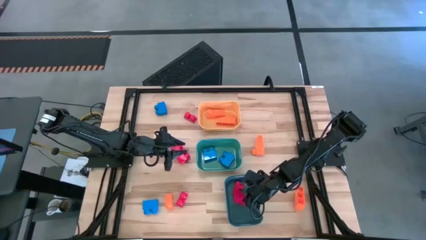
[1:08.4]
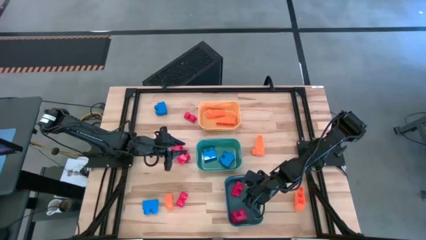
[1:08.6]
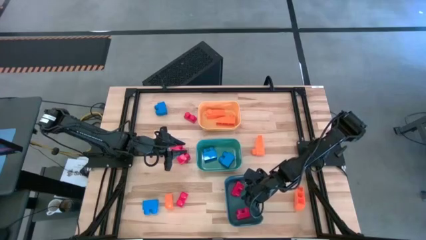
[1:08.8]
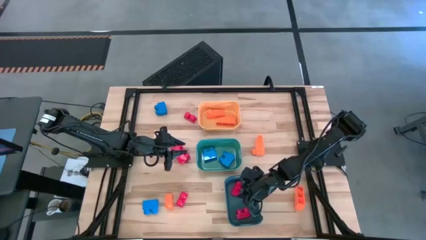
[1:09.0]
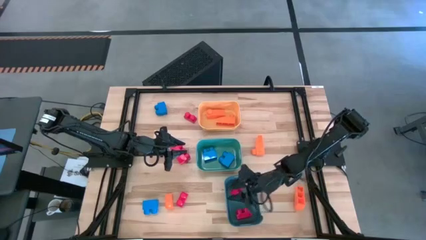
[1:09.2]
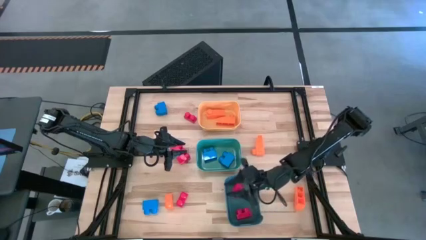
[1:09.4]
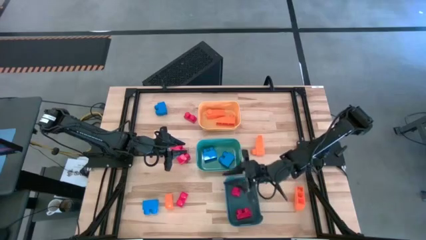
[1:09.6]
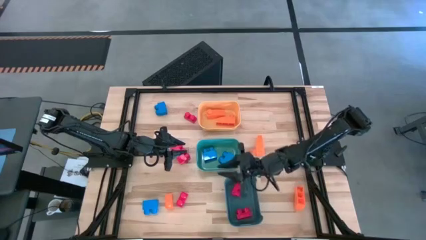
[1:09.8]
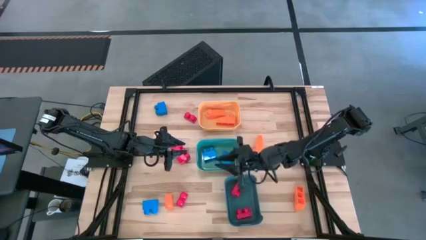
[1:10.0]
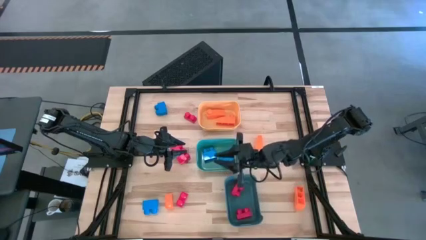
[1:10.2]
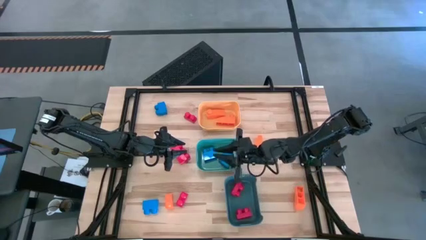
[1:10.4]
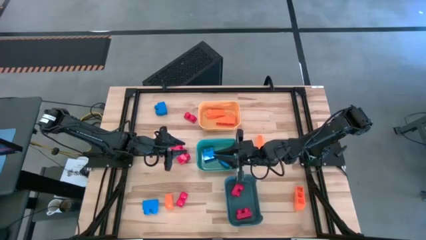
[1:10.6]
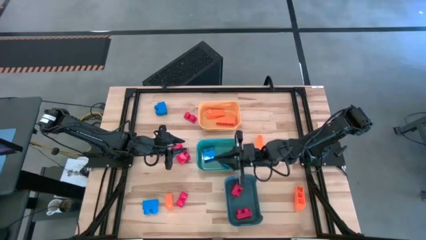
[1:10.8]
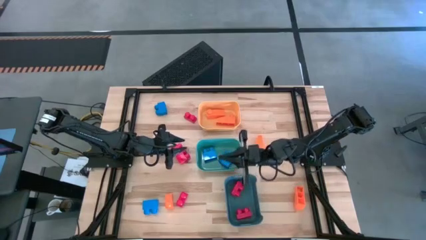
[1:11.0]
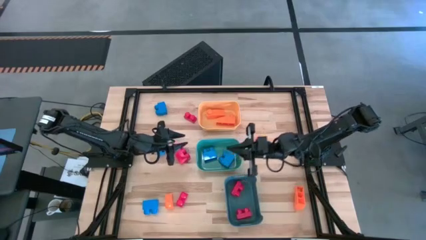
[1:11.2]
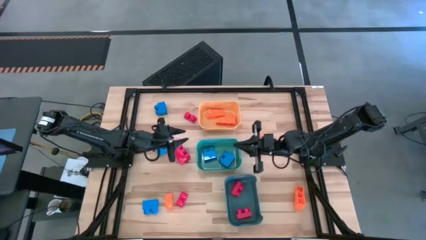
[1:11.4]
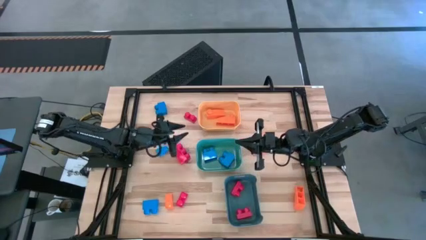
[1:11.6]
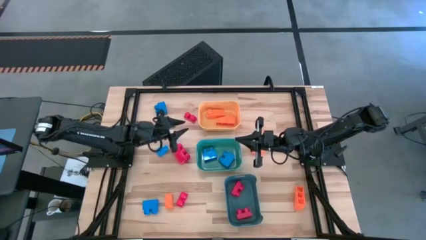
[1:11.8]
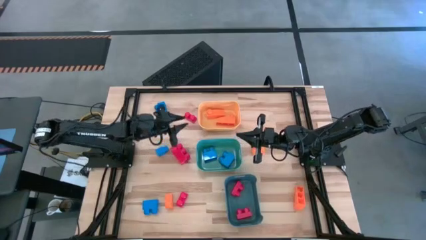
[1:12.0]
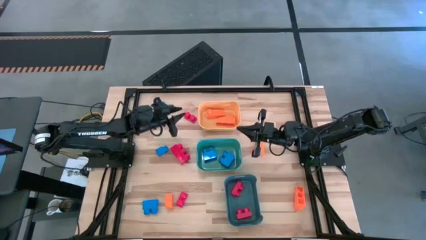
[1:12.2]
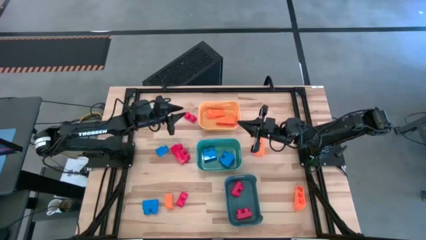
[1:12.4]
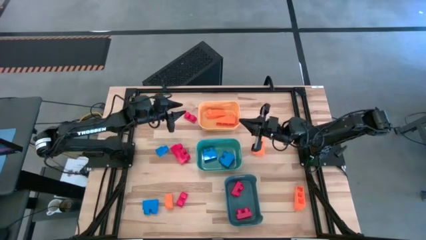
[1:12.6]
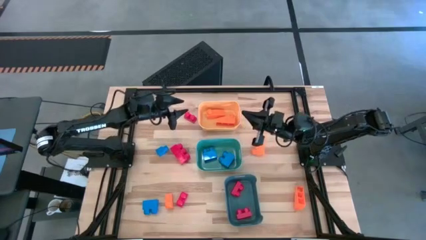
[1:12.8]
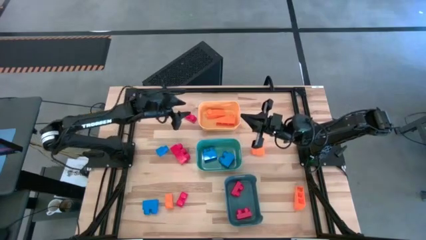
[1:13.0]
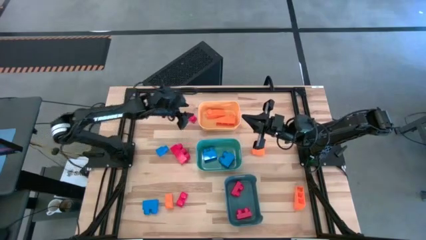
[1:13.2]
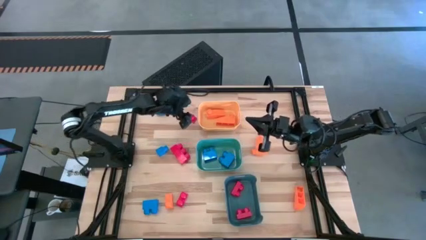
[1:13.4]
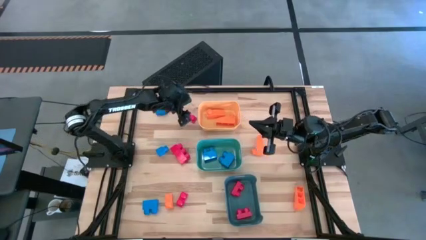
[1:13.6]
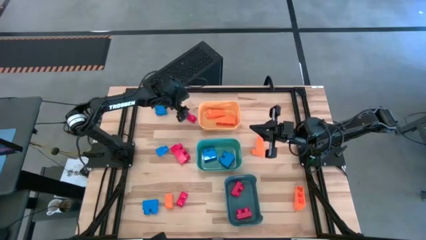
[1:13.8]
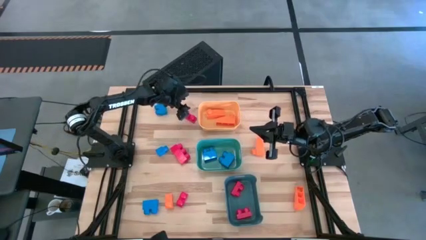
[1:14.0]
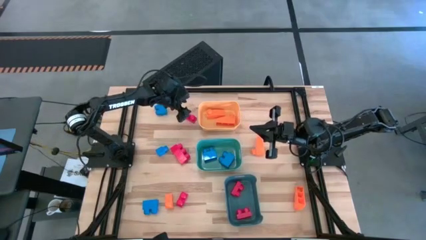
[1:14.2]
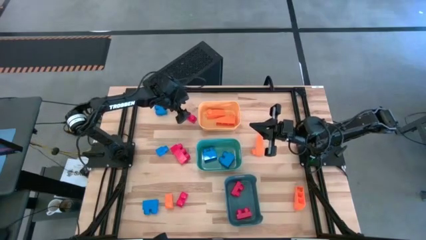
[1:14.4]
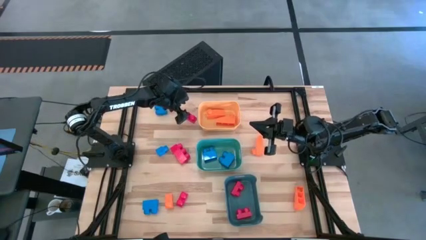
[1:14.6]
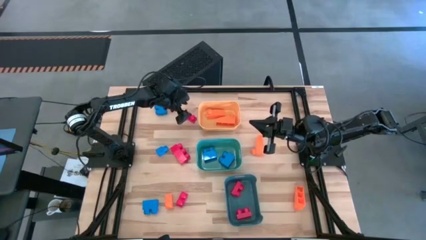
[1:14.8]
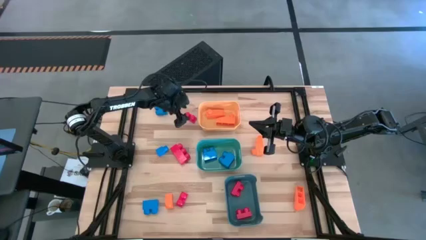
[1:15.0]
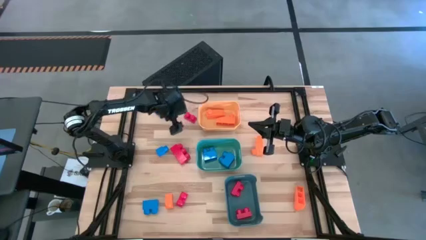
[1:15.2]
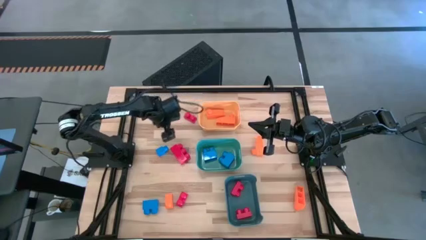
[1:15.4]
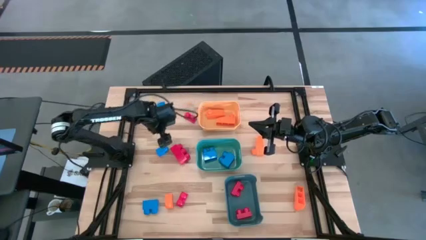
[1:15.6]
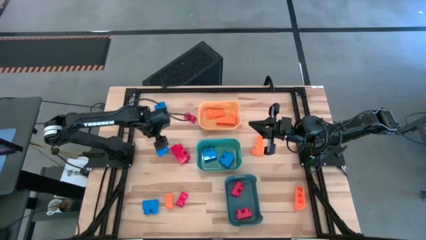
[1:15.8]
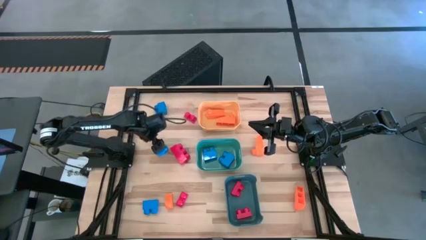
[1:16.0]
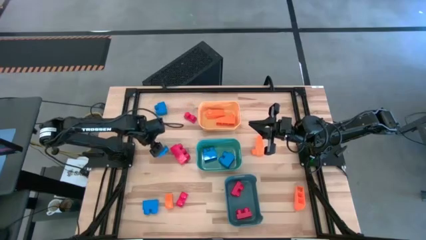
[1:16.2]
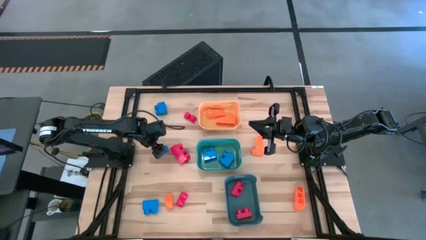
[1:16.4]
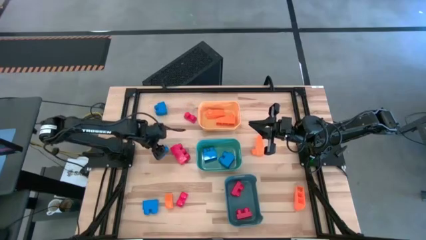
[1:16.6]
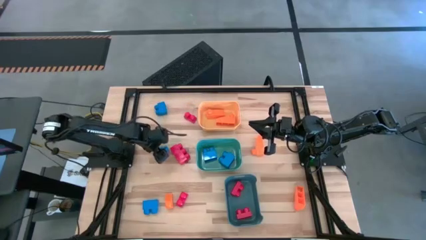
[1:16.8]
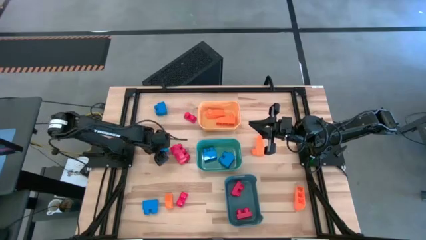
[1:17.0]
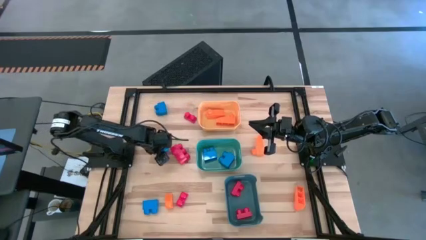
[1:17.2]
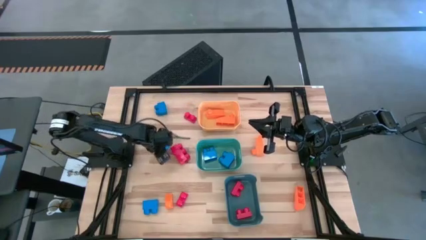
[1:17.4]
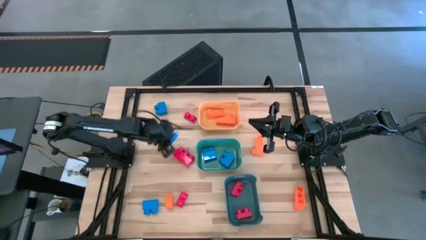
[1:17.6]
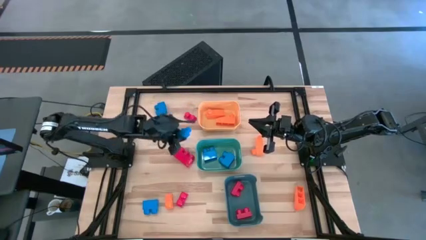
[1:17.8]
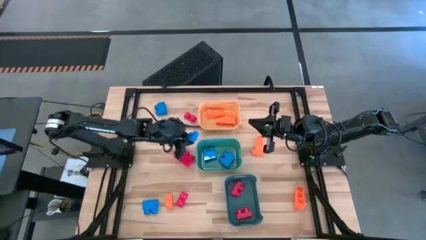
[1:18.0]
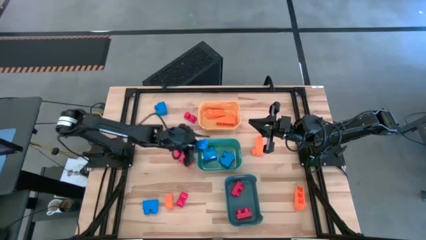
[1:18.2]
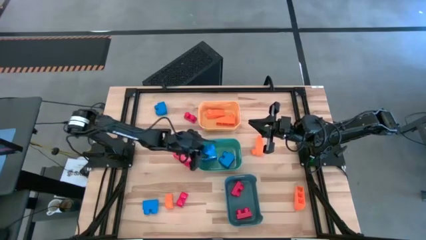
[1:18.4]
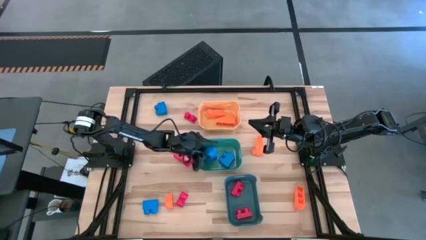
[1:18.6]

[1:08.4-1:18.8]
Task: Sort & place blocks by color
Put the blue game piece into the green bin

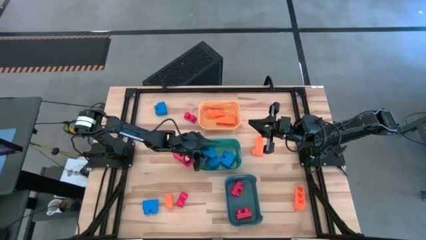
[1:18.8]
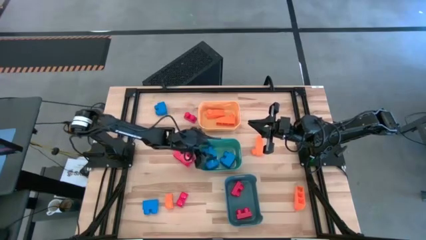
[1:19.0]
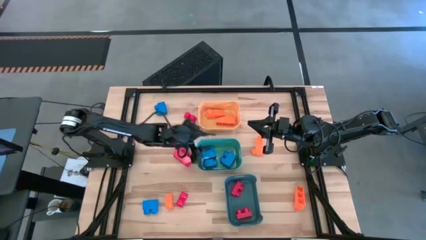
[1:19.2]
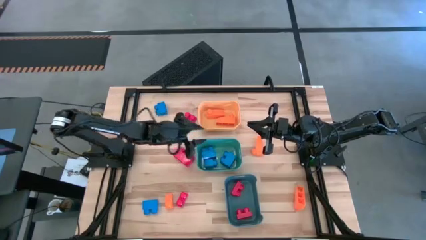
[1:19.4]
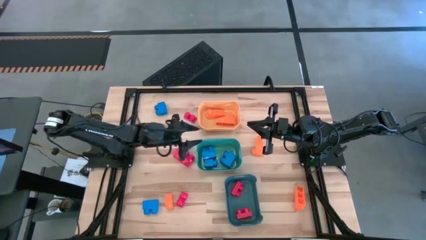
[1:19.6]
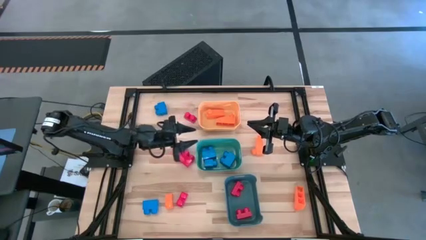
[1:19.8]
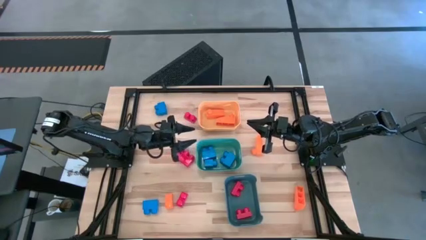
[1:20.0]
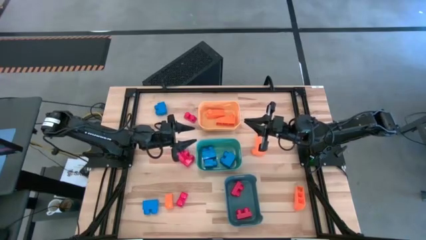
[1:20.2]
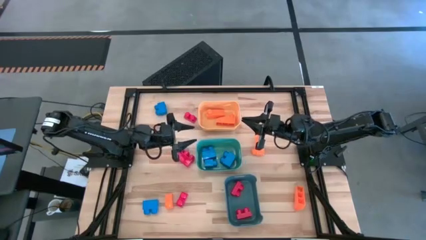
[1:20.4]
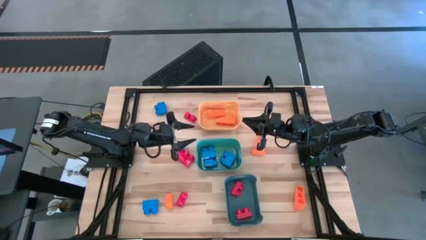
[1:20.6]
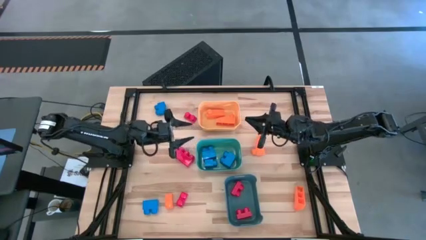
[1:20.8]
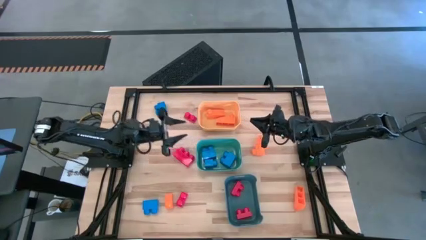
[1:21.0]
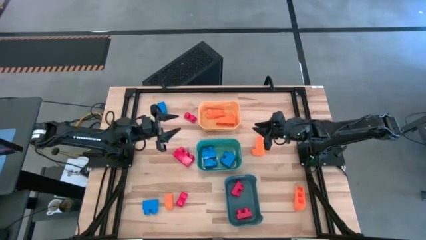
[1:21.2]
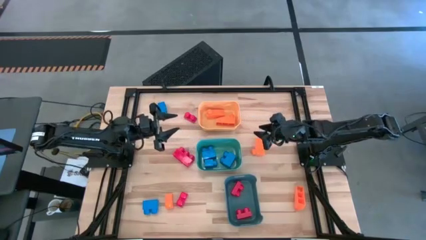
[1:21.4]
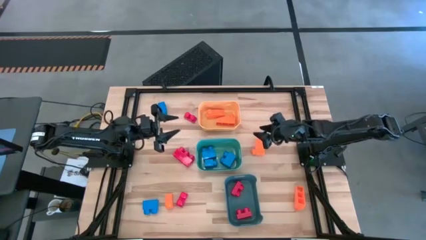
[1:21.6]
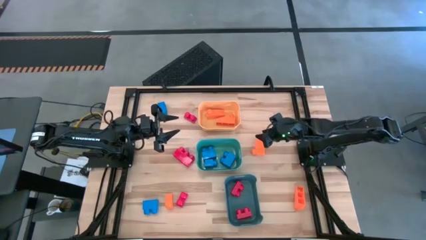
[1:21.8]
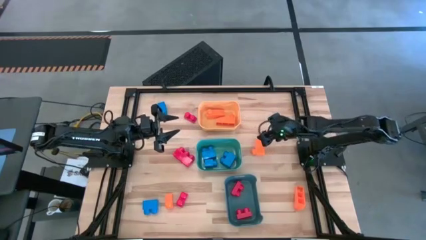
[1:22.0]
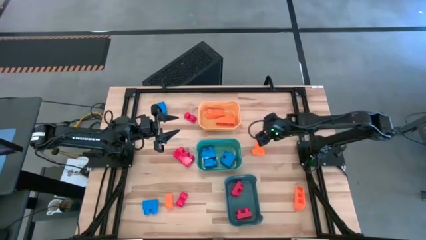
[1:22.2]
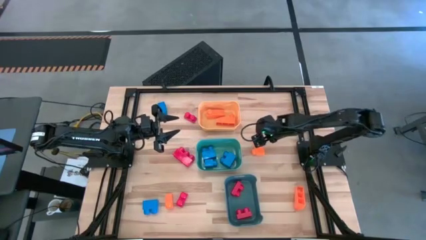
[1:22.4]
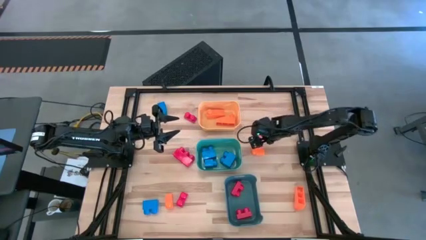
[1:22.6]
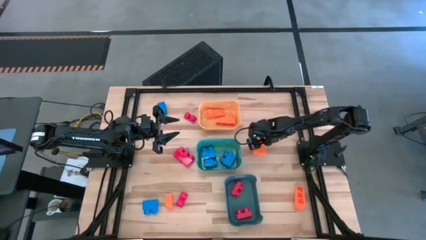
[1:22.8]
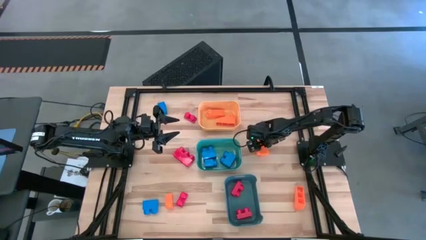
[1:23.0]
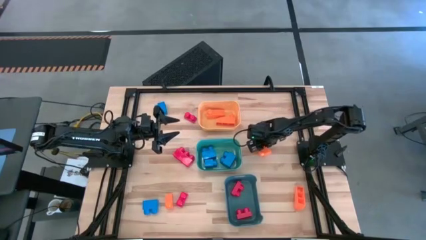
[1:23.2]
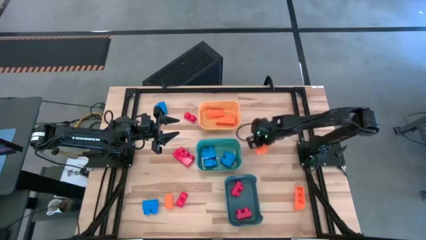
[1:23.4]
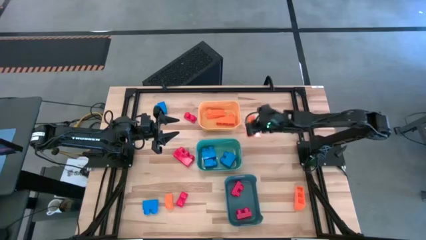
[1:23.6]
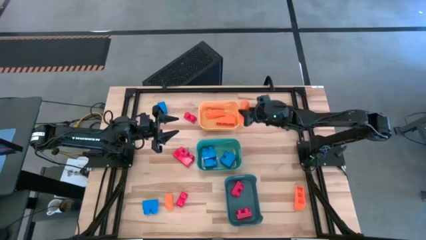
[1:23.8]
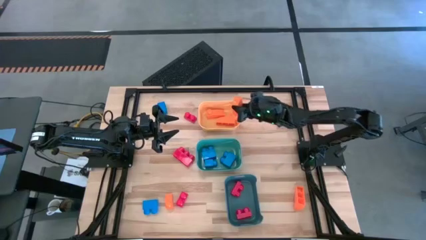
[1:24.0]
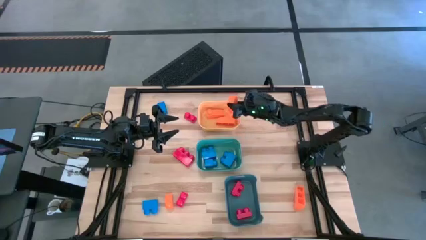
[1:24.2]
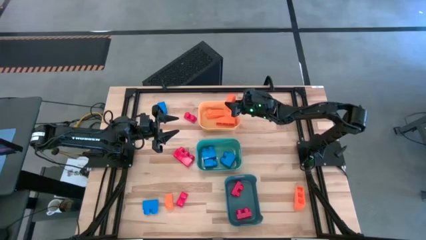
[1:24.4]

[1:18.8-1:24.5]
Put the orange game piece into the orange bin
